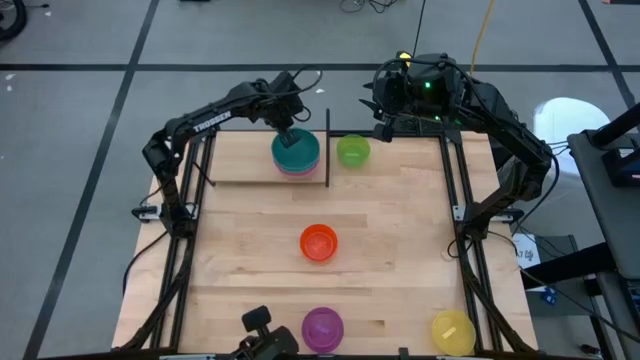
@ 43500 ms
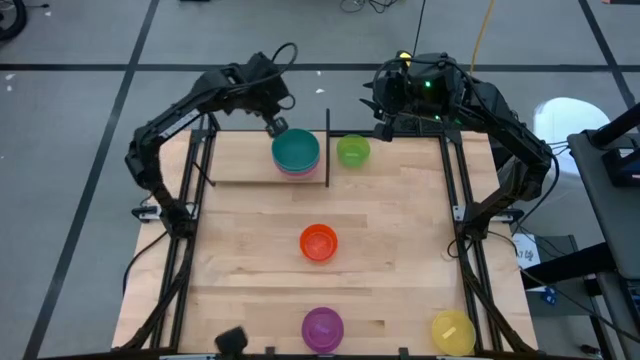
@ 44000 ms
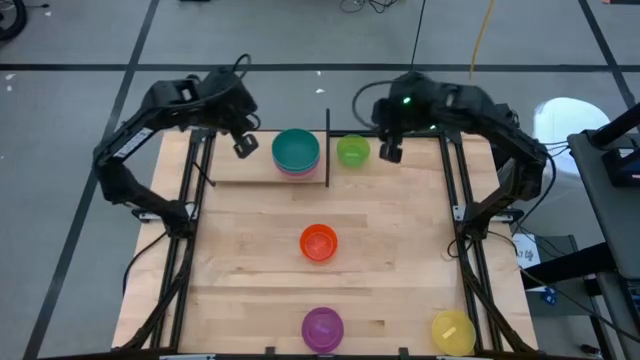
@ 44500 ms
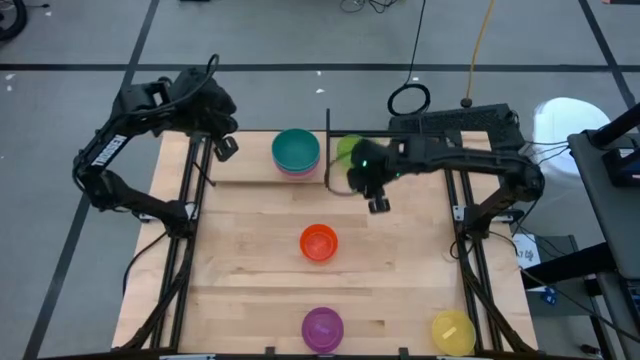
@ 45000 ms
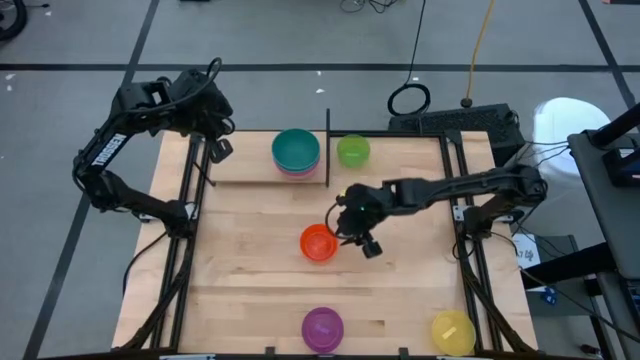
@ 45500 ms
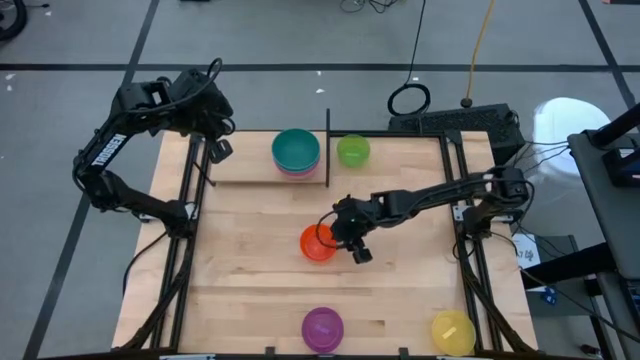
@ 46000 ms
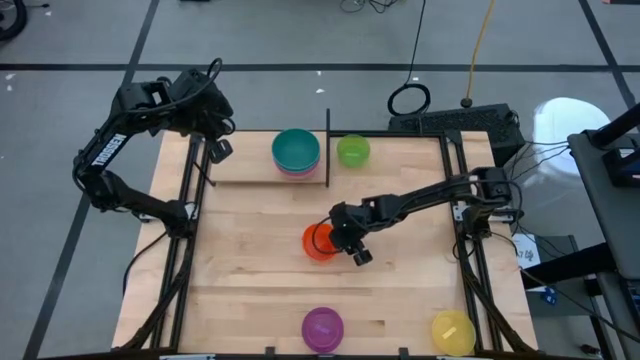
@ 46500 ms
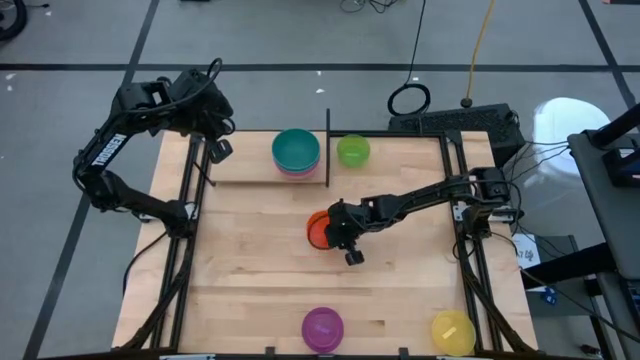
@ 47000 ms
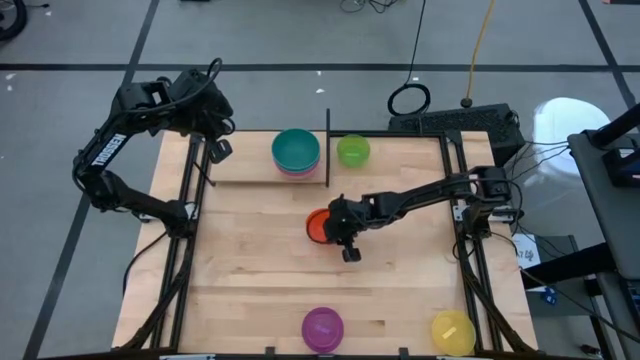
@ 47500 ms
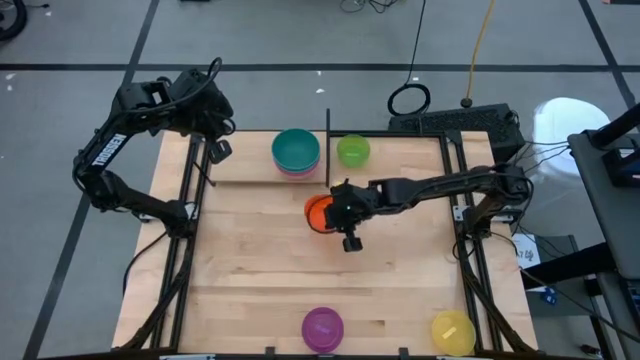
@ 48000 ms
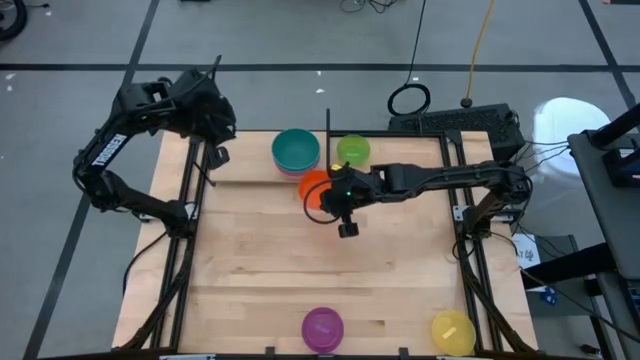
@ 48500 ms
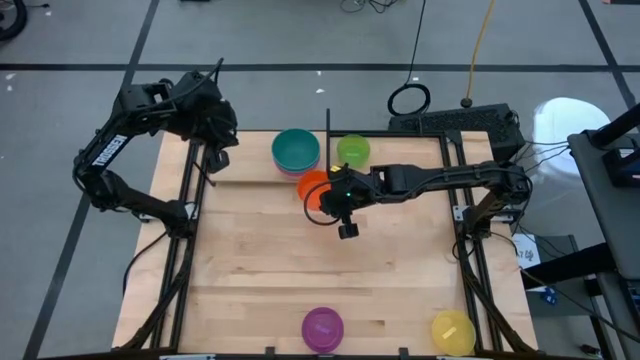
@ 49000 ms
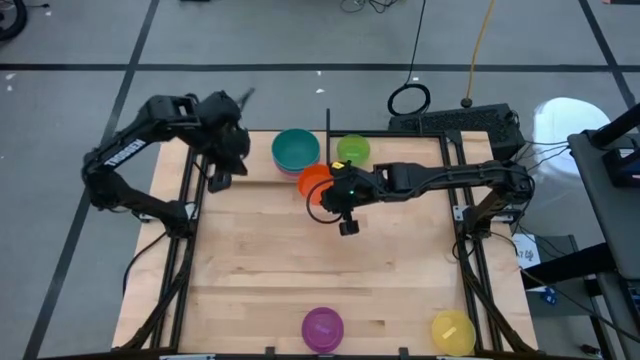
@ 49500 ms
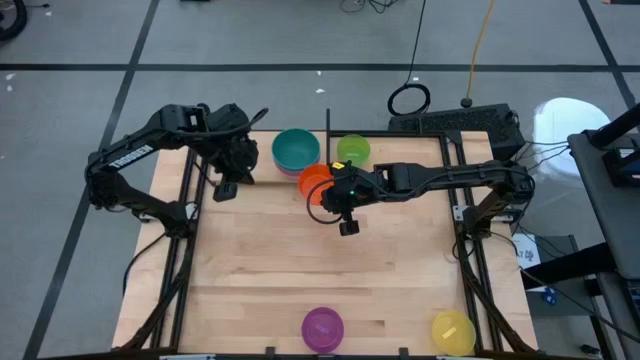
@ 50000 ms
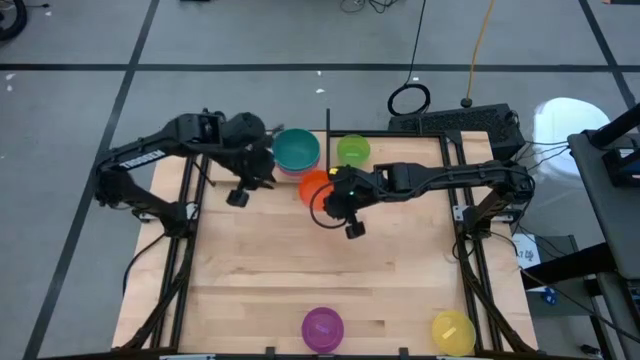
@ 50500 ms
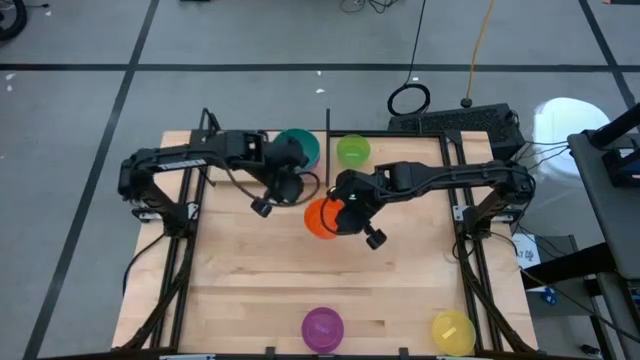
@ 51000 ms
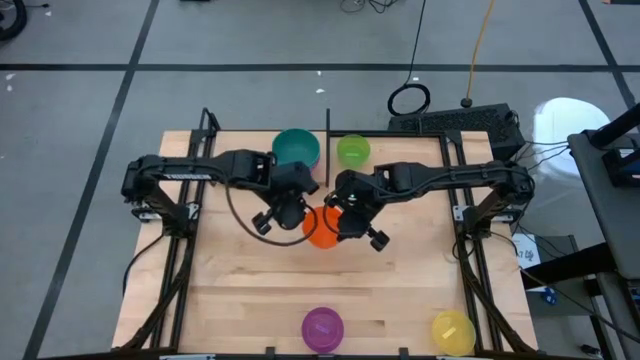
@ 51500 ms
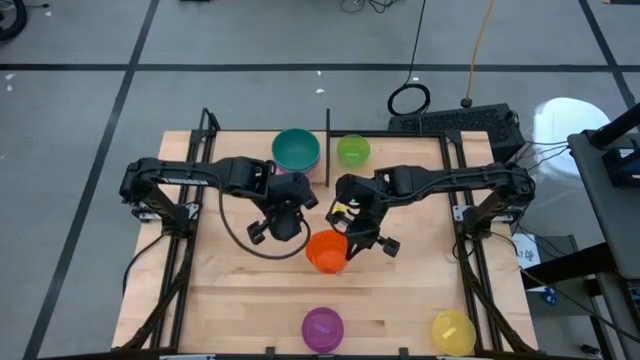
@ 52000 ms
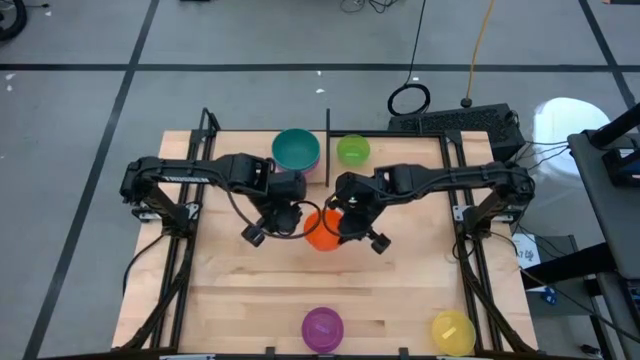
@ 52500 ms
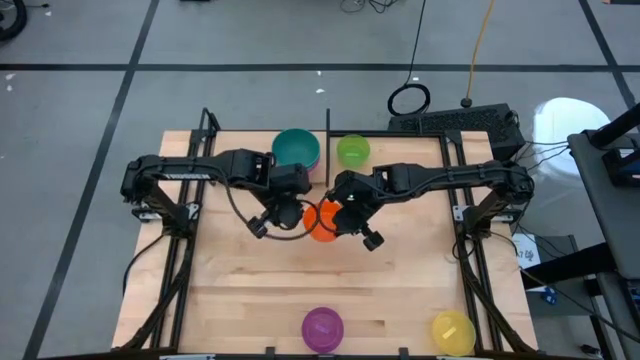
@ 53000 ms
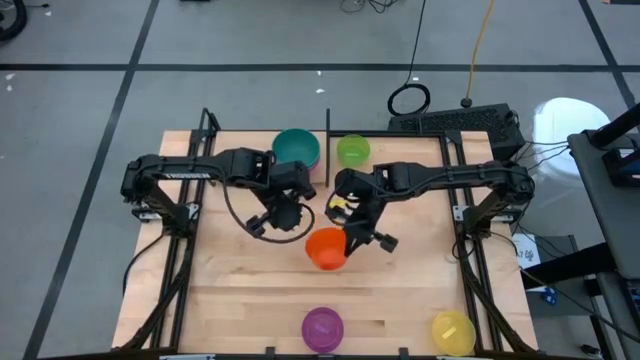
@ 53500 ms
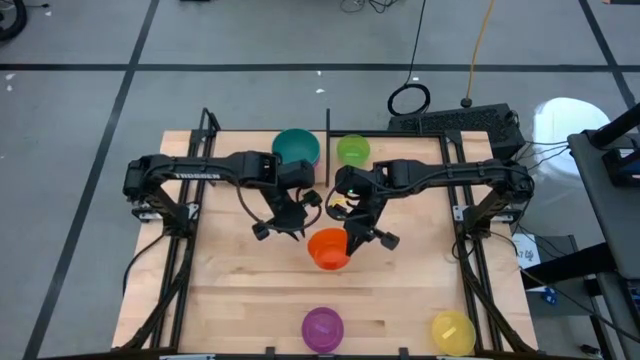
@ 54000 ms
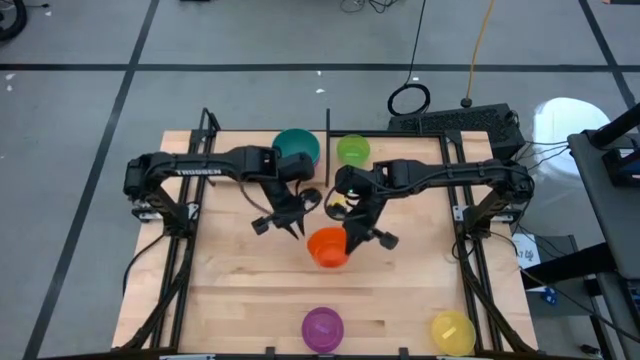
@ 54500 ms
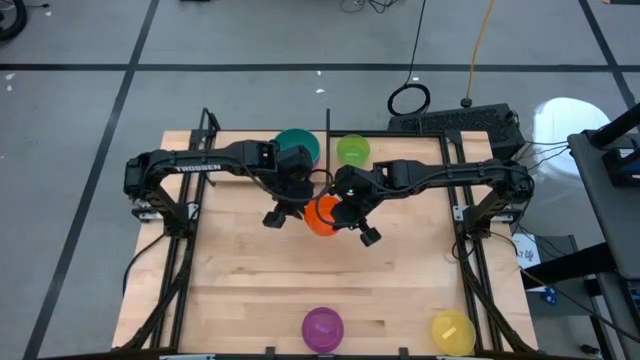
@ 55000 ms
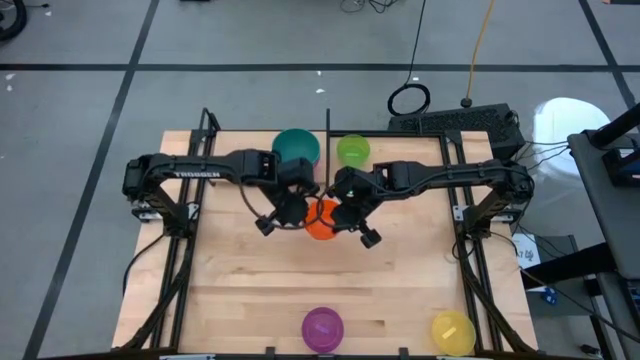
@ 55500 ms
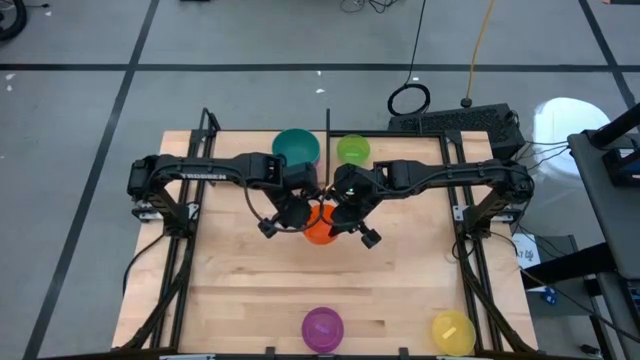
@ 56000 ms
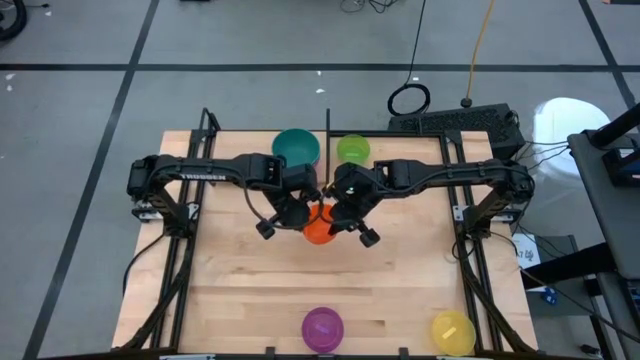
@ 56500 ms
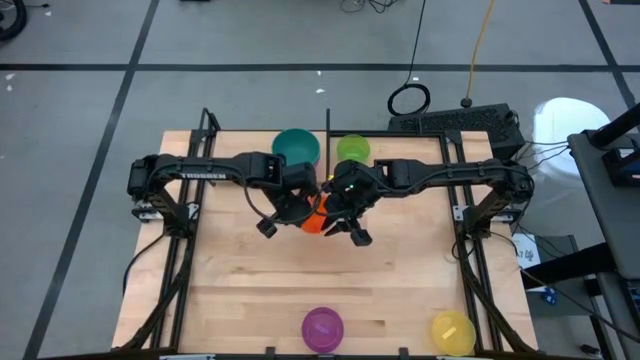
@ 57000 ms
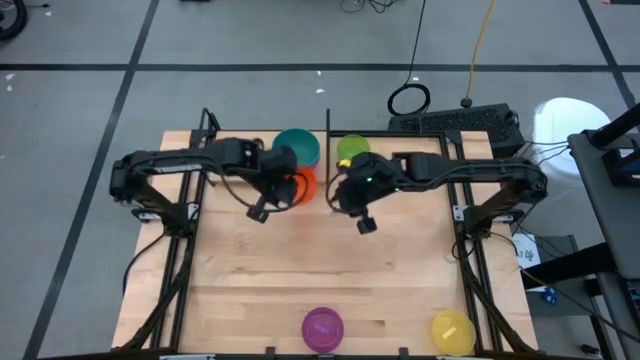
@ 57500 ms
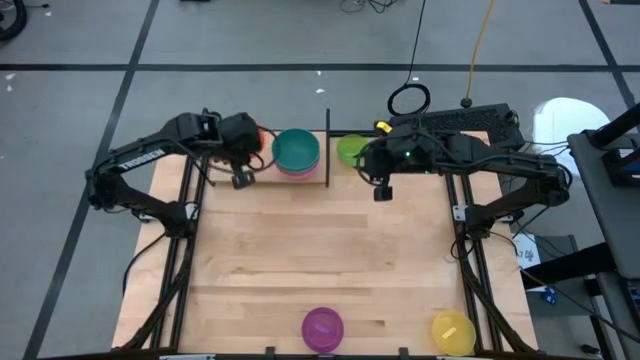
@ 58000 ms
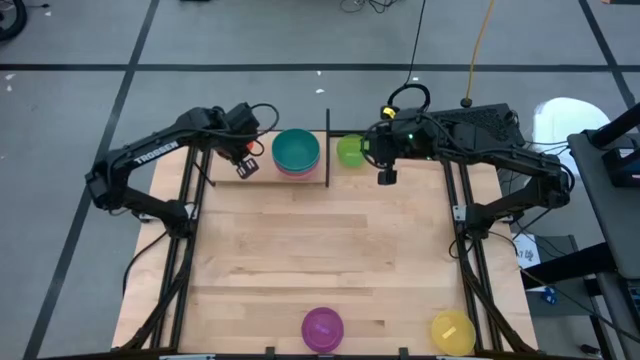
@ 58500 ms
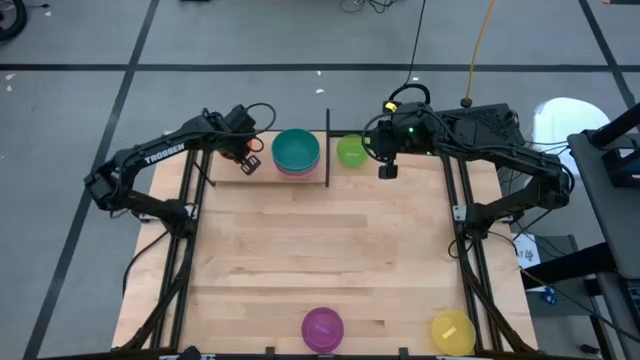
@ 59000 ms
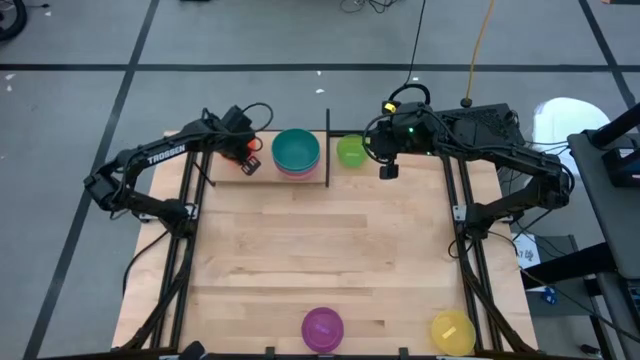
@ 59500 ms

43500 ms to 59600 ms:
Task: Place and stack bowls onto a shelf
Put the orange bowl on the shelf

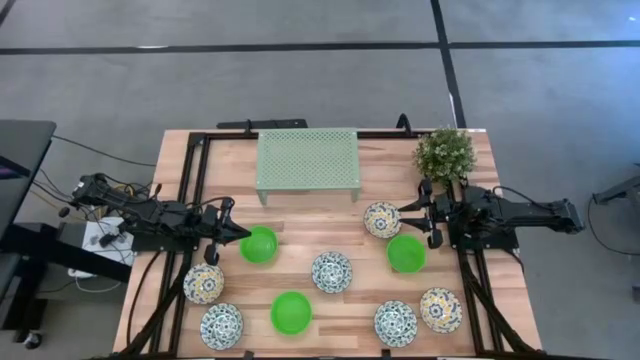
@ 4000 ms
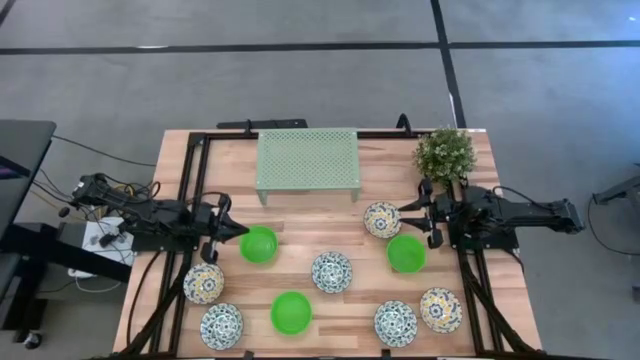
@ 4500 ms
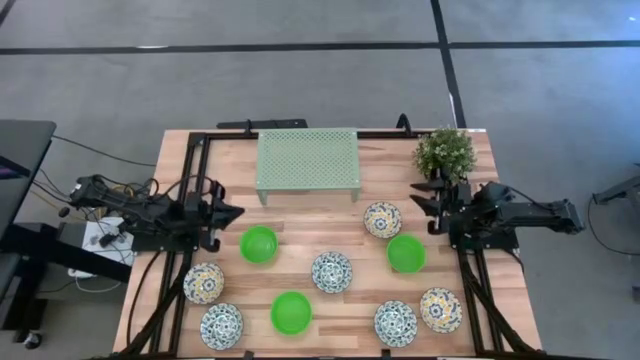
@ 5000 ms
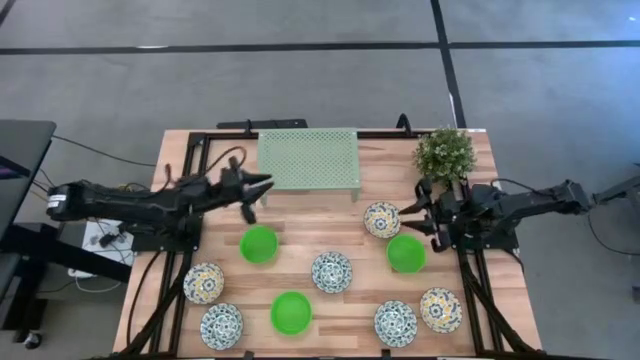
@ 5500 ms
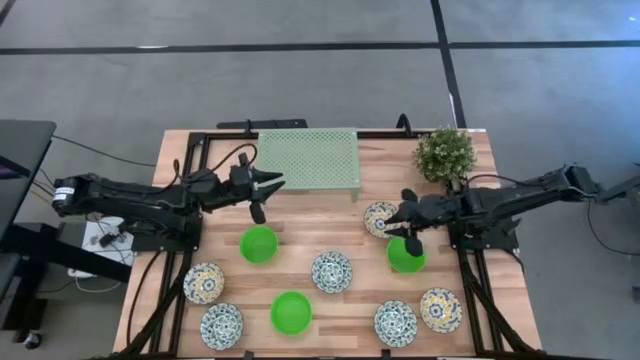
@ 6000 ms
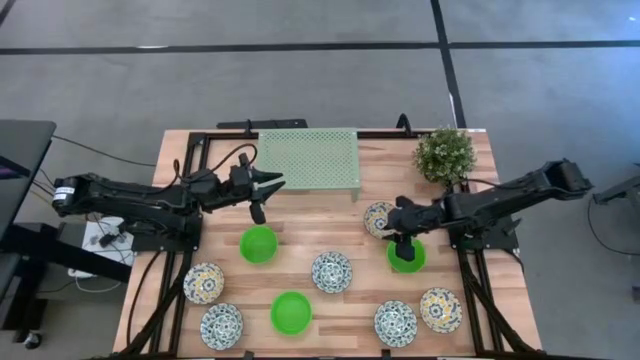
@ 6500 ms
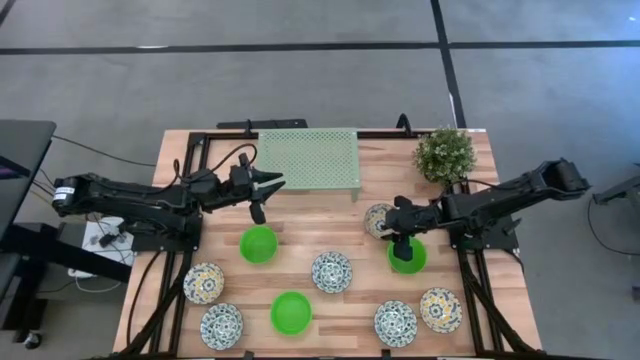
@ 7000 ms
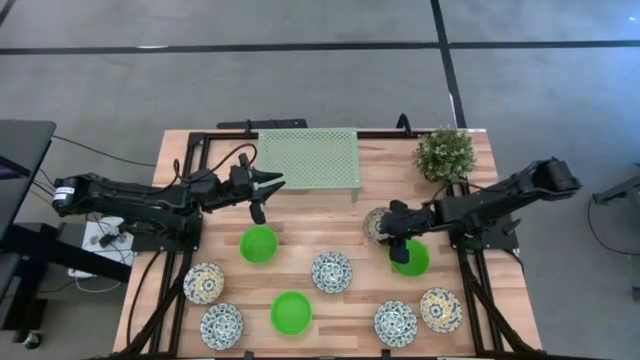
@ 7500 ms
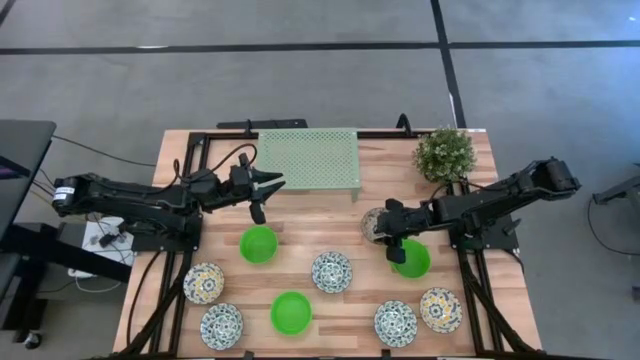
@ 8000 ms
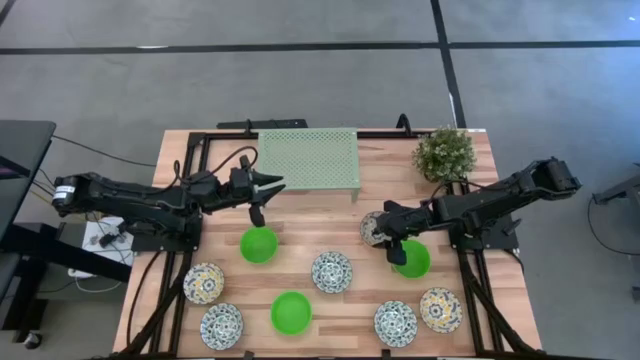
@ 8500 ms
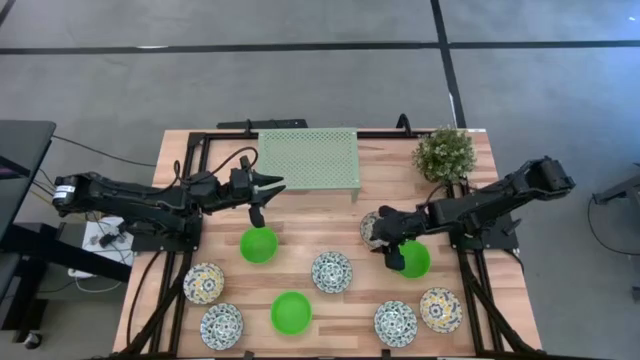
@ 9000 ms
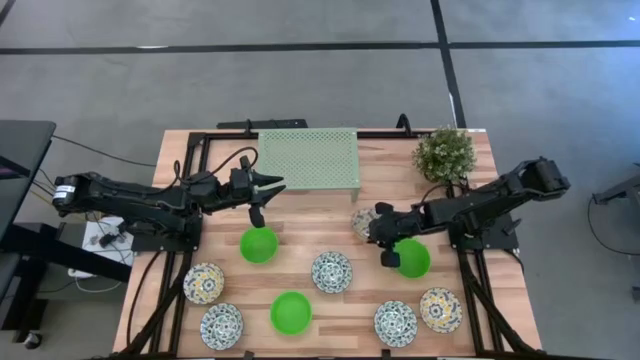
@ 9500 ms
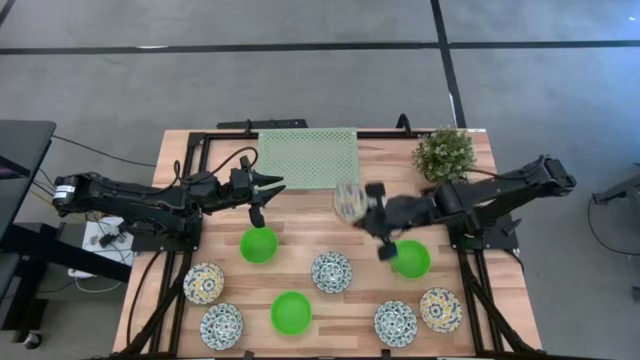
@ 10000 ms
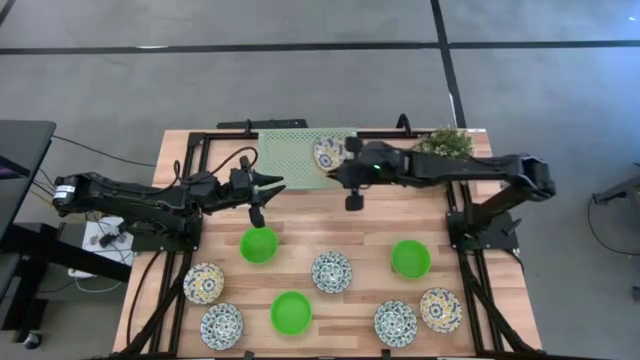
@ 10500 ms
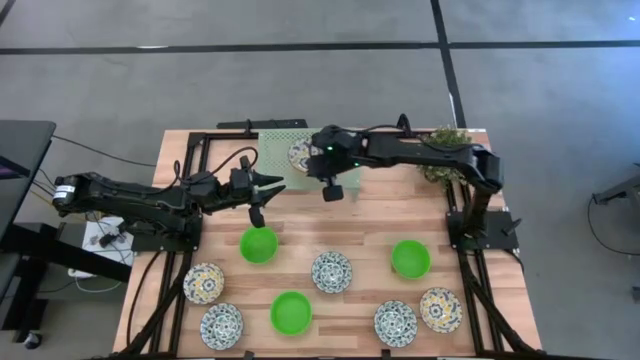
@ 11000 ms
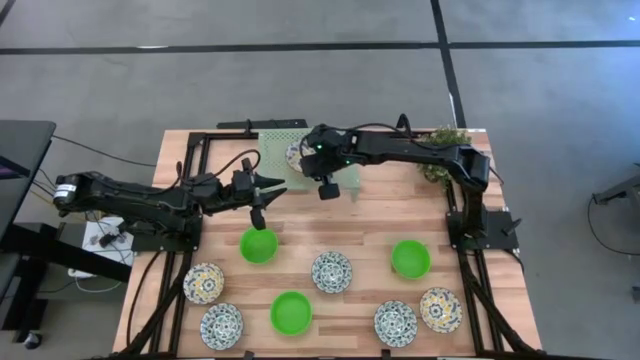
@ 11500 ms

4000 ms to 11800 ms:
Task: Pick & Place Mini bowls
Put the top yellow patterned bowl on the shelf
